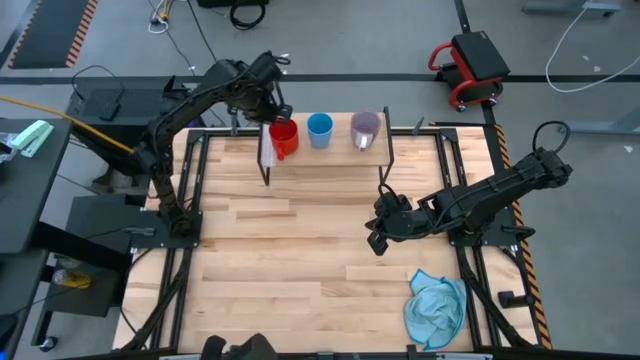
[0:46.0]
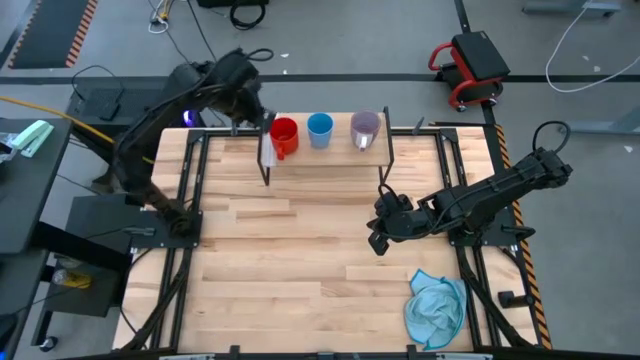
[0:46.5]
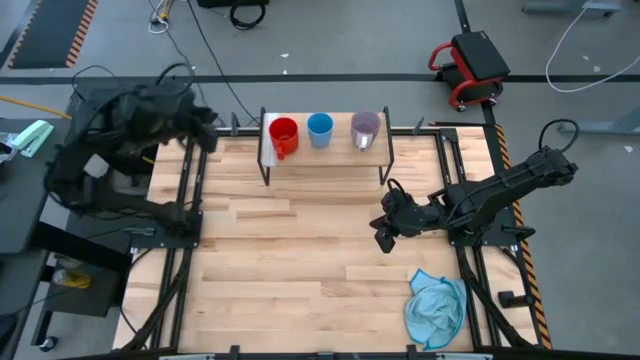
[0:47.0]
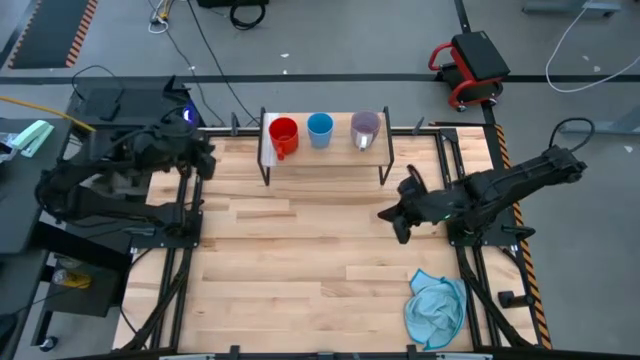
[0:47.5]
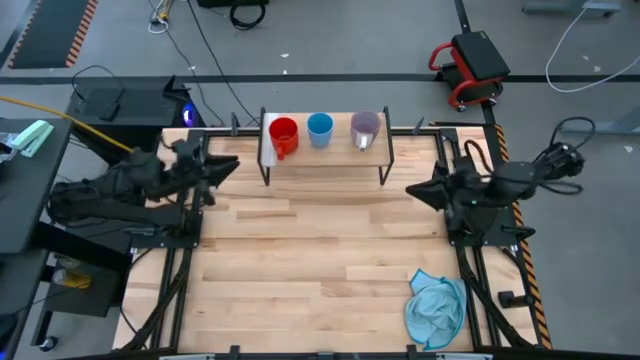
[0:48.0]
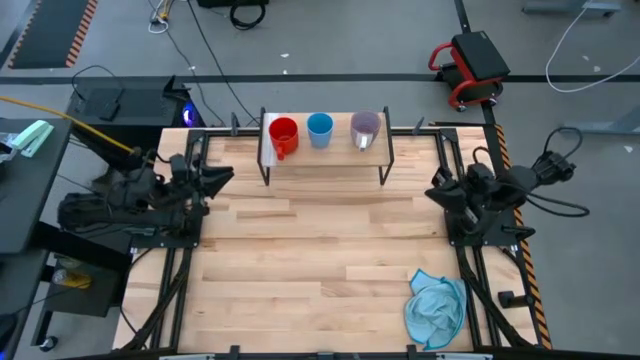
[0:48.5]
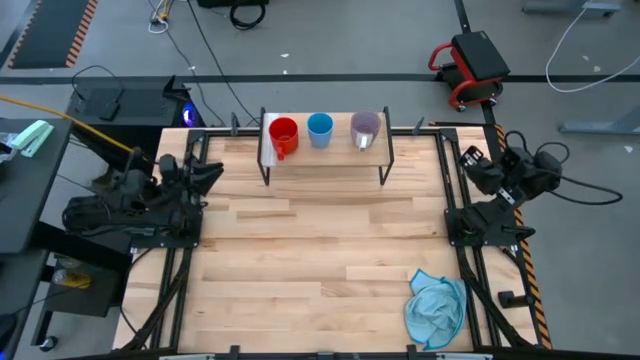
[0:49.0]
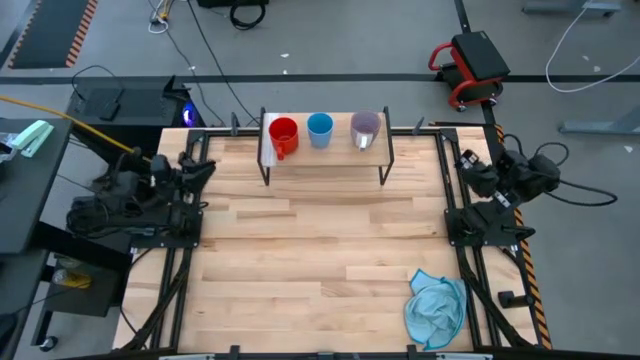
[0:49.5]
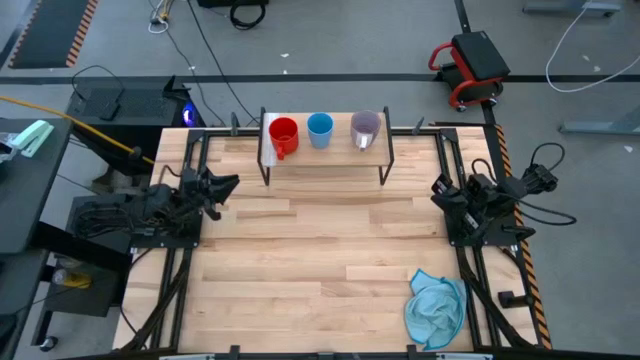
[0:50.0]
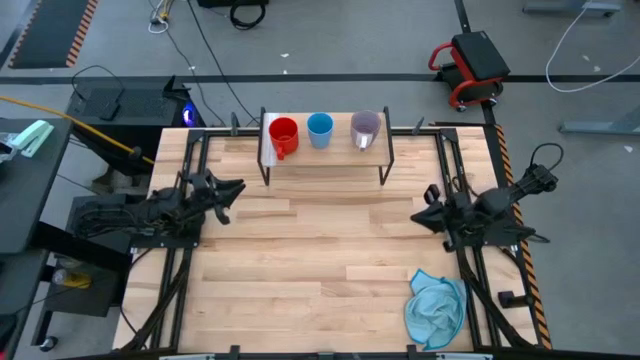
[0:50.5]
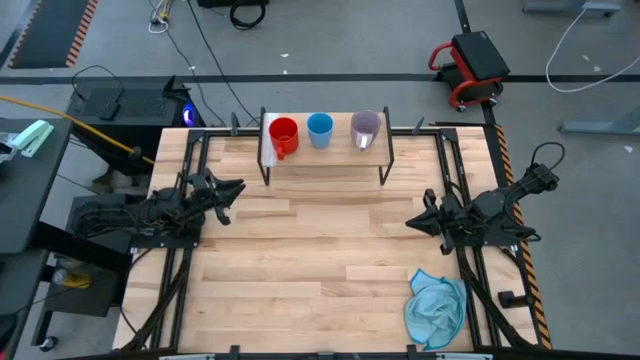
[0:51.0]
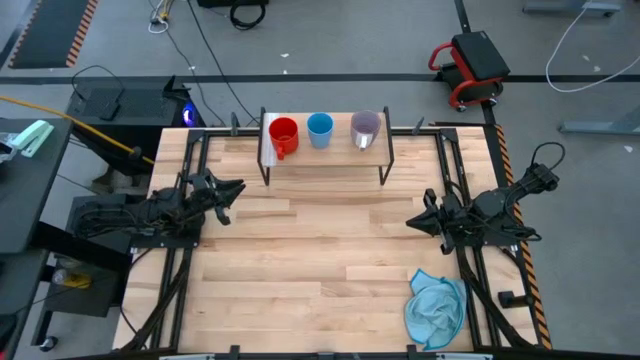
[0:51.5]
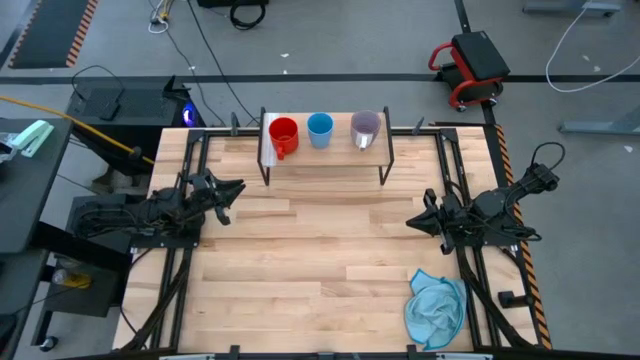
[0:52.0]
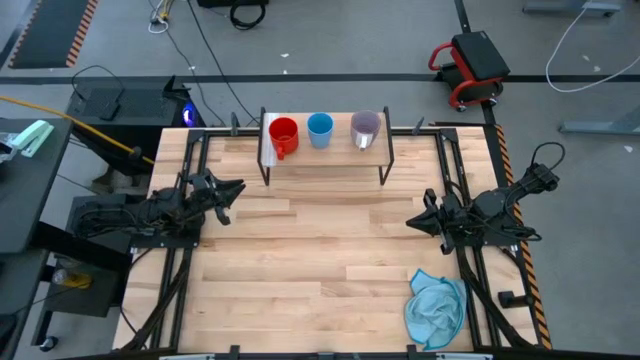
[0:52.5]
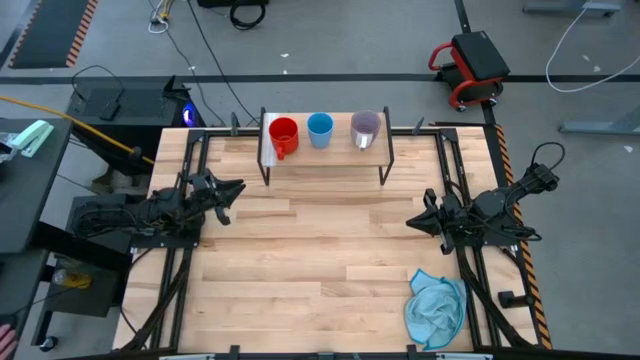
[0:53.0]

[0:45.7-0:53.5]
Task: Stack small to large cups/mugs on shelf
Return to Home Position
